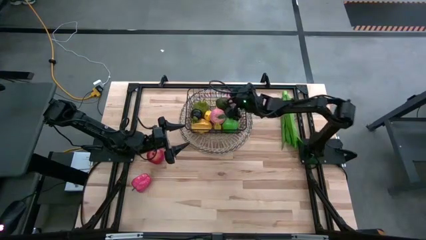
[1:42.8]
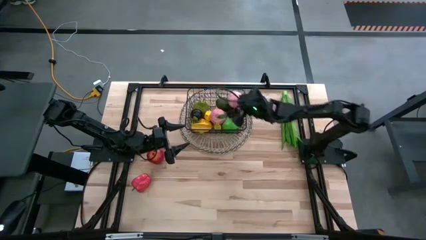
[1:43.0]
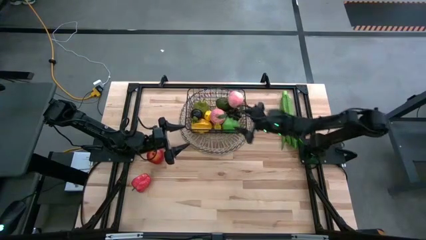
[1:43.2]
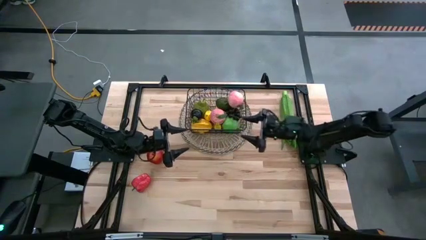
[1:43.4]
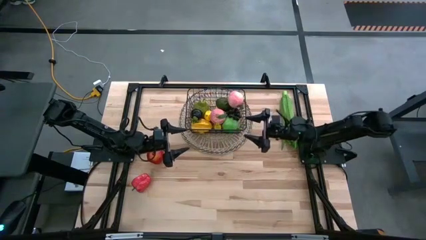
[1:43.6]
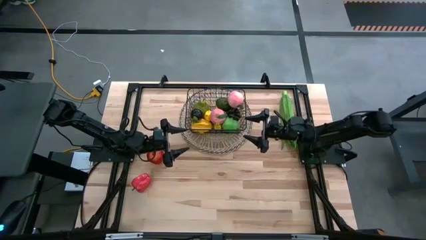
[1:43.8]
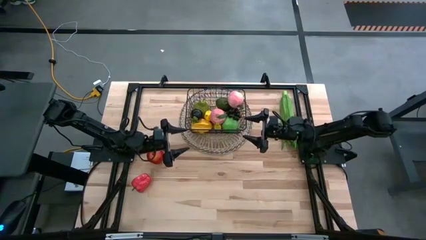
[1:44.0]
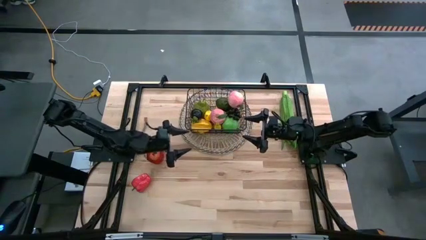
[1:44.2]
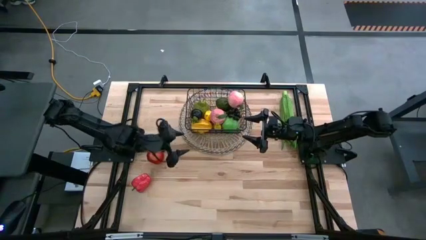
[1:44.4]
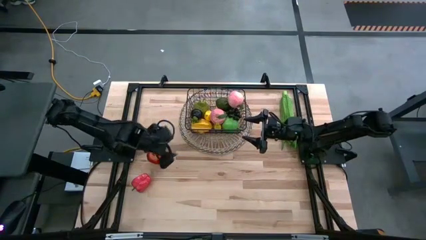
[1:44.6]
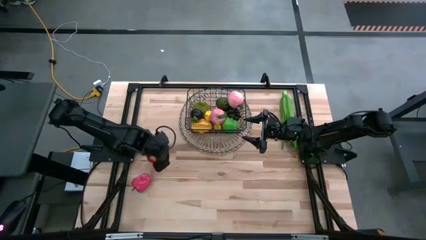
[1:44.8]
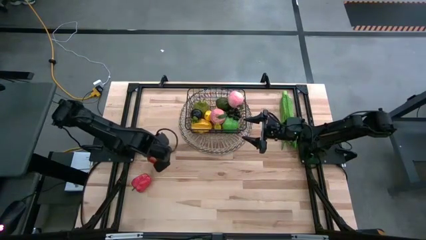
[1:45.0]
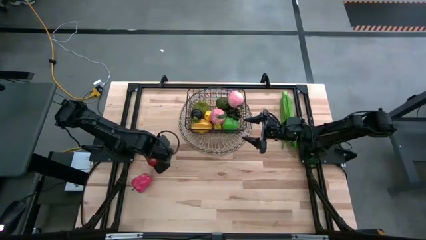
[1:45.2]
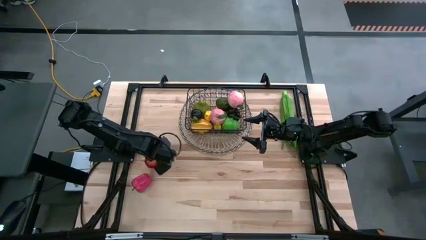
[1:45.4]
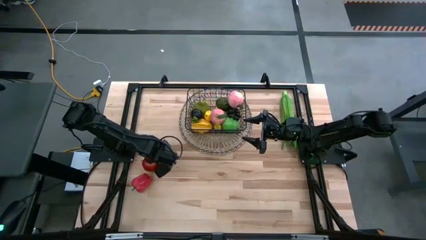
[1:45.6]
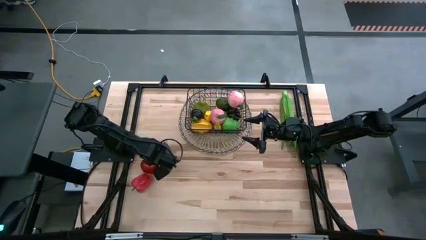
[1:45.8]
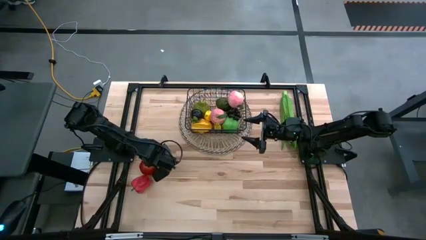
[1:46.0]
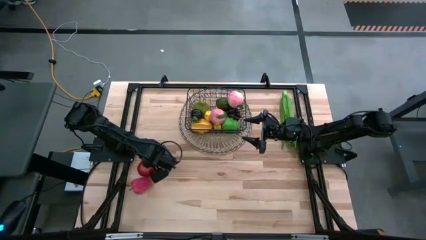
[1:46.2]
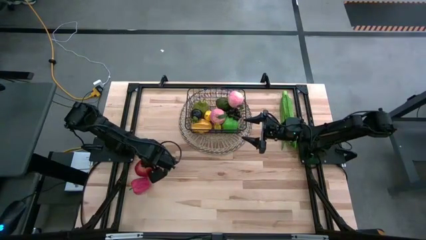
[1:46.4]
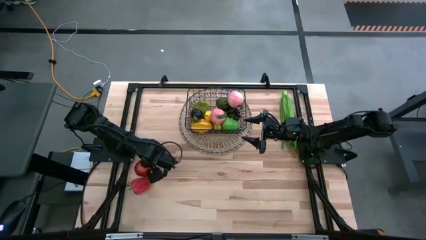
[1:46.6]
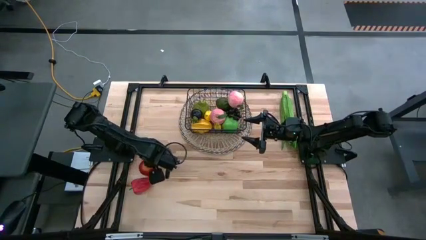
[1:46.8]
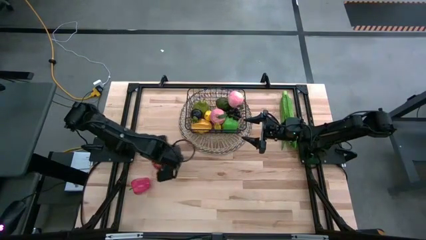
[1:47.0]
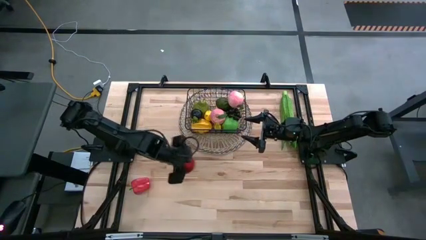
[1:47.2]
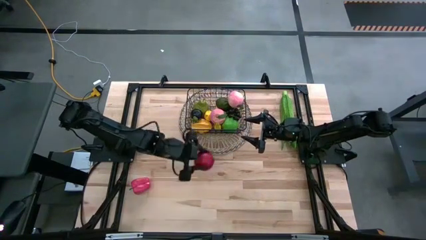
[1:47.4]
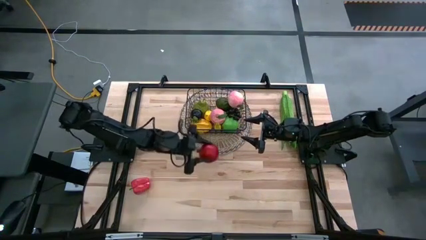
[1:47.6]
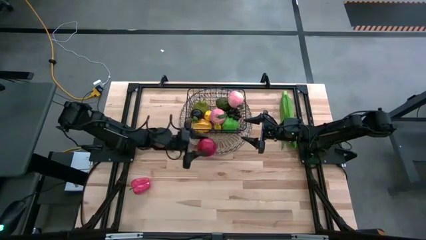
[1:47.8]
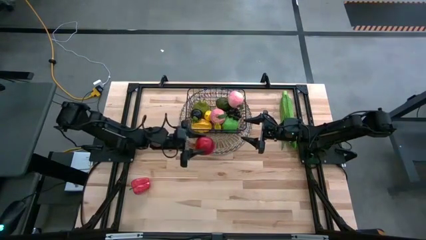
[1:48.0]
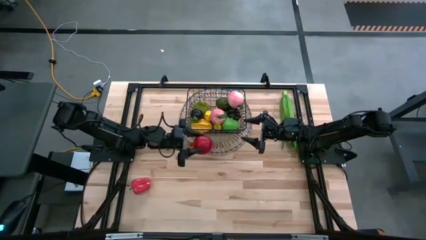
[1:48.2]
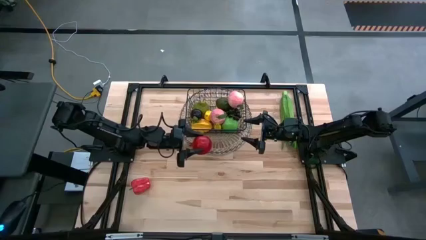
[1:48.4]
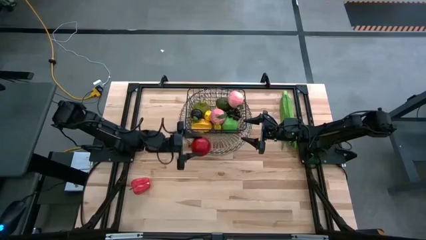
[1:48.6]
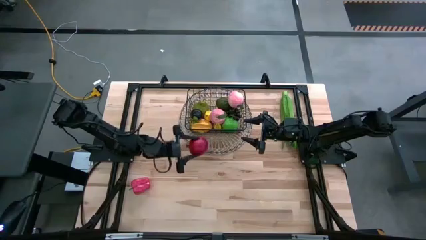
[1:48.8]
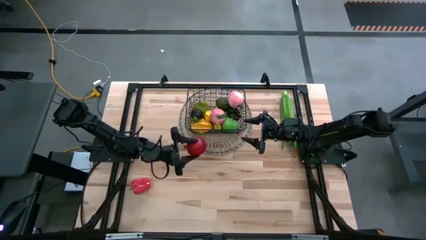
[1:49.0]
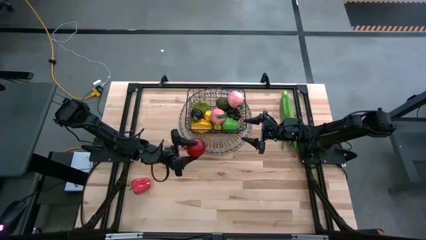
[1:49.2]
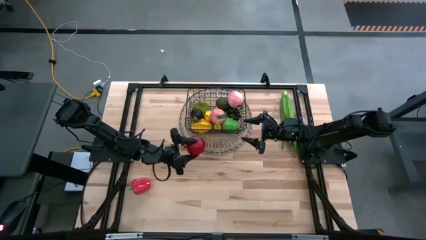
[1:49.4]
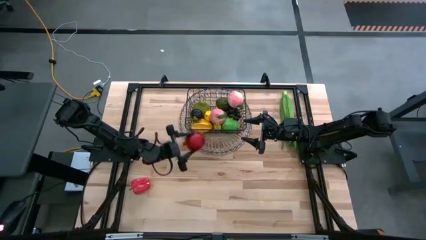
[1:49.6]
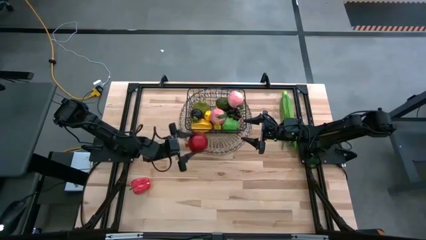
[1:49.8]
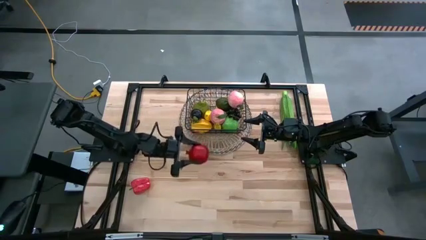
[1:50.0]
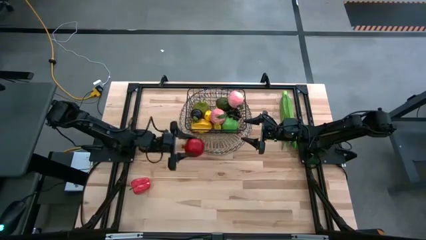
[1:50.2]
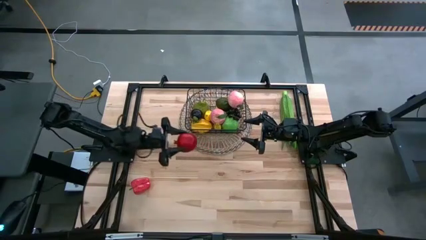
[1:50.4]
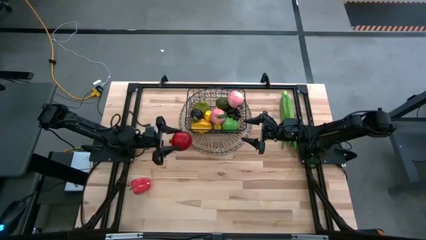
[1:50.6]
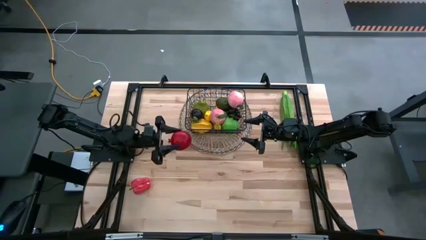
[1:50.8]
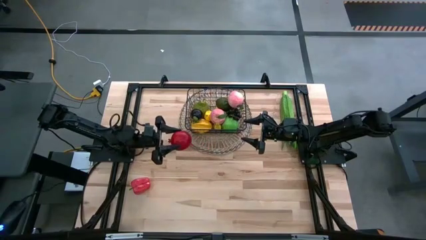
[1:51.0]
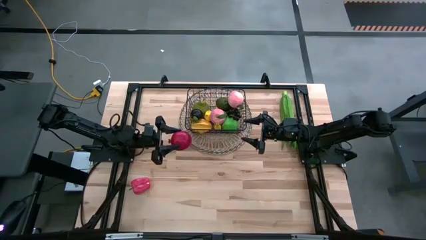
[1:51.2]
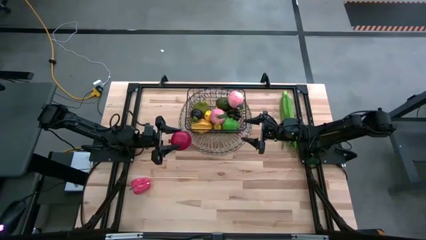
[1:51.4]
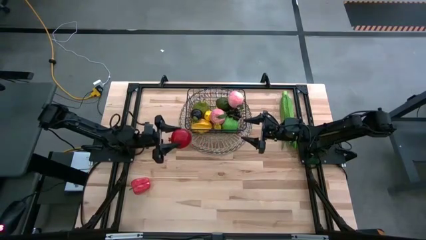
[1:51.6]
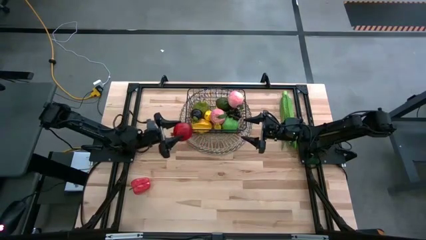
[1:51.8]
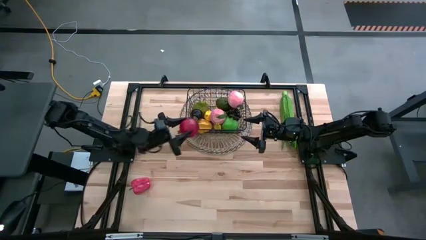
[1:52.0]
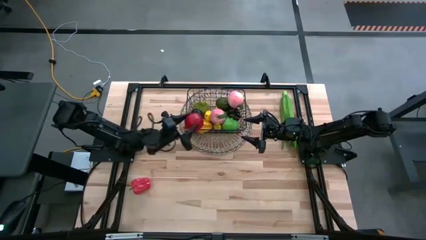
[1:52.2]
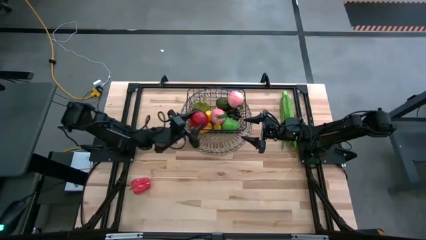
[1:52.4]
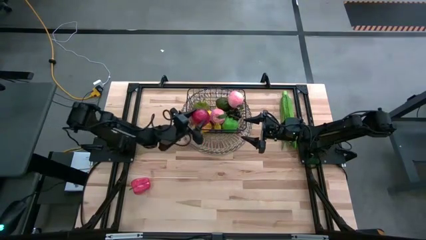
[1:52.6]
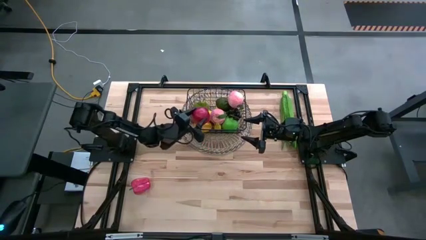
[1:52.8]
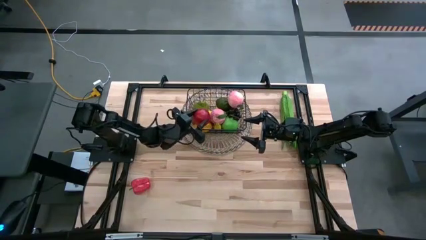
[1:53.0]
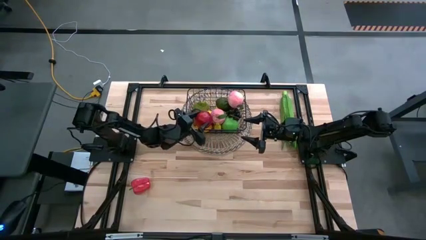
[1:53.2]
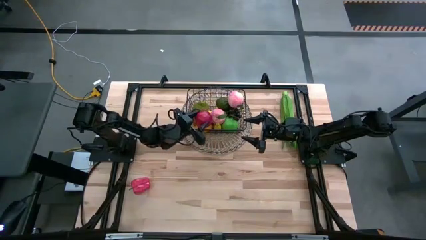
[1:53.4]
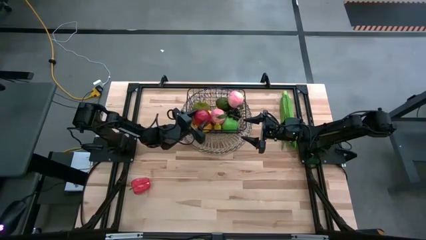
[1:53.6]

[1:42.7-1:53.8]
Task: Build produce basket
Put the pomegranate into the black wire basket

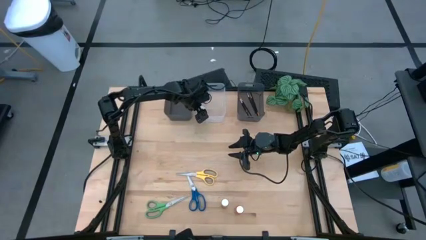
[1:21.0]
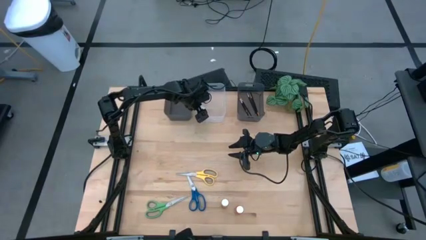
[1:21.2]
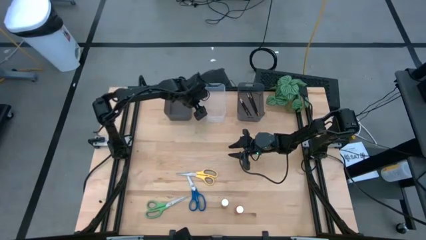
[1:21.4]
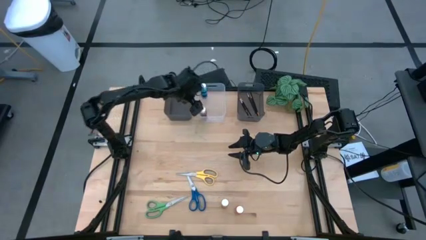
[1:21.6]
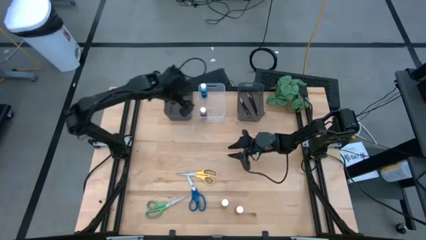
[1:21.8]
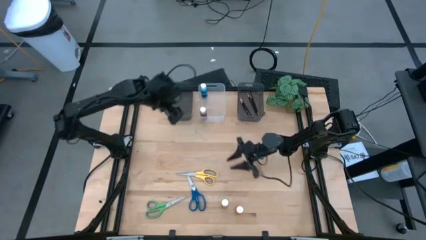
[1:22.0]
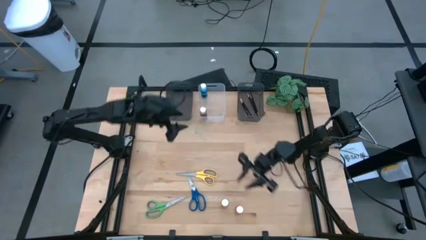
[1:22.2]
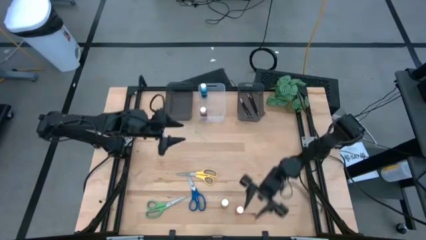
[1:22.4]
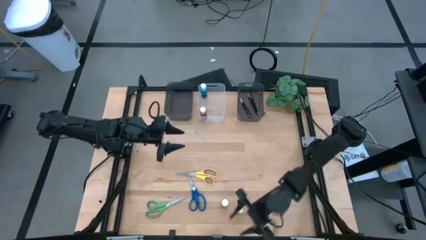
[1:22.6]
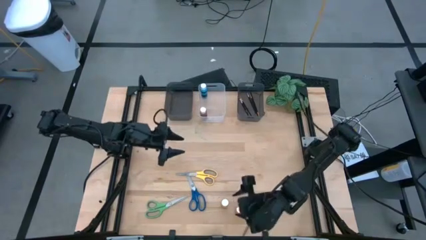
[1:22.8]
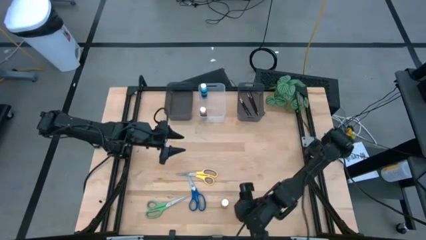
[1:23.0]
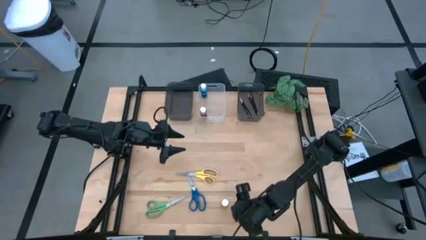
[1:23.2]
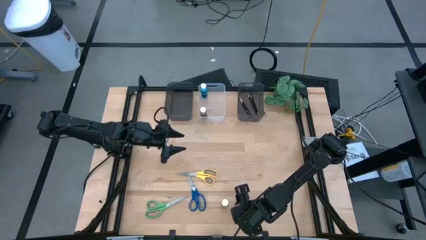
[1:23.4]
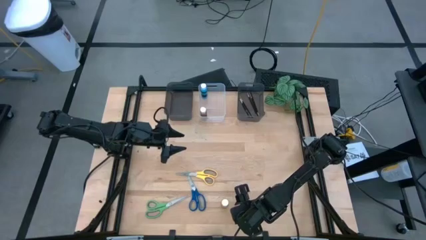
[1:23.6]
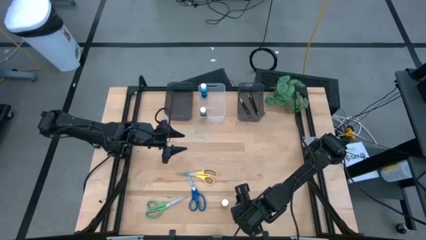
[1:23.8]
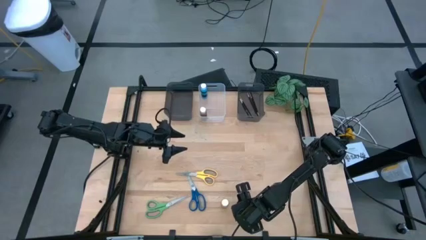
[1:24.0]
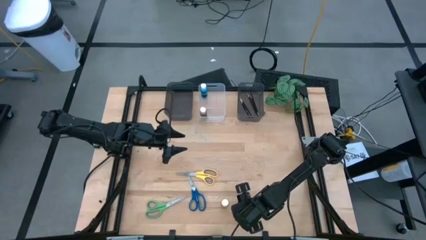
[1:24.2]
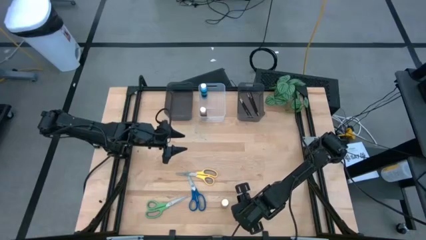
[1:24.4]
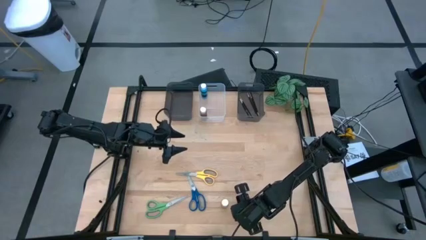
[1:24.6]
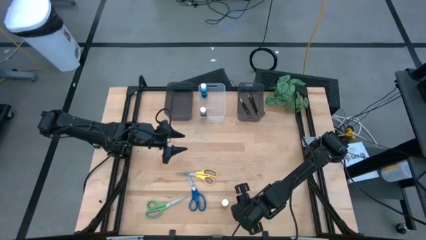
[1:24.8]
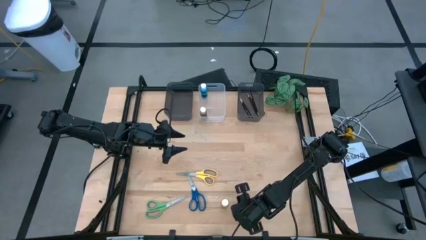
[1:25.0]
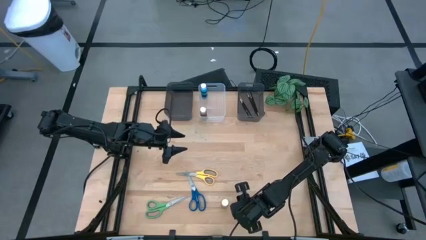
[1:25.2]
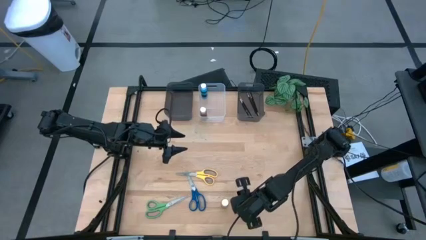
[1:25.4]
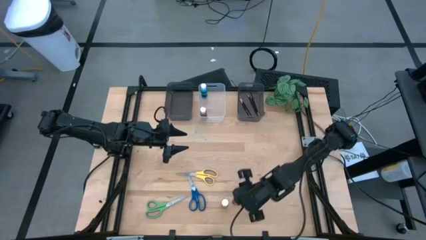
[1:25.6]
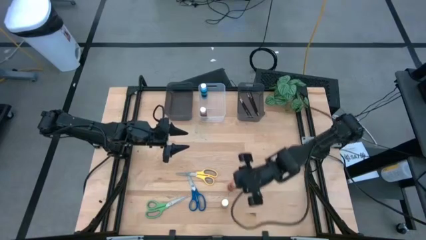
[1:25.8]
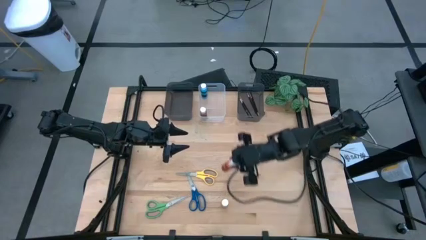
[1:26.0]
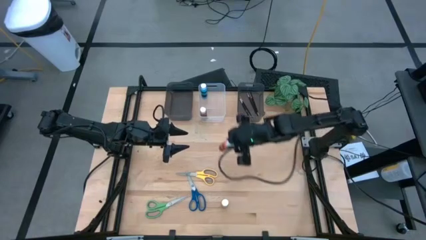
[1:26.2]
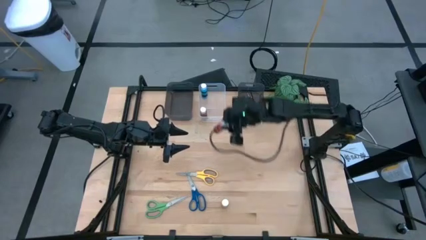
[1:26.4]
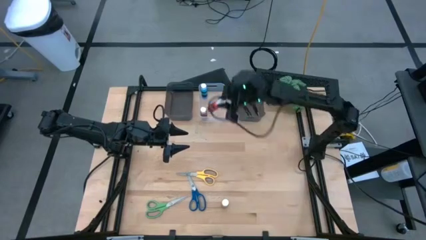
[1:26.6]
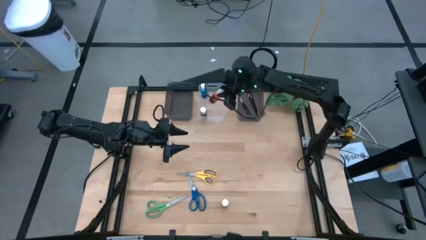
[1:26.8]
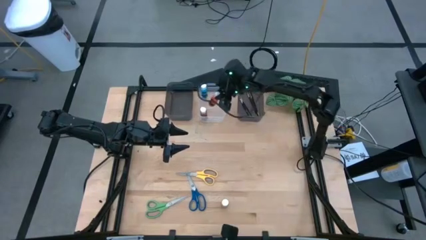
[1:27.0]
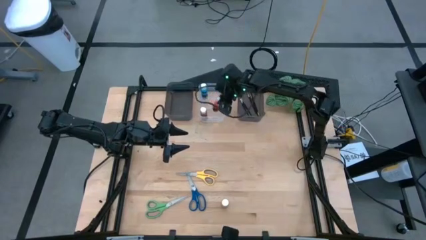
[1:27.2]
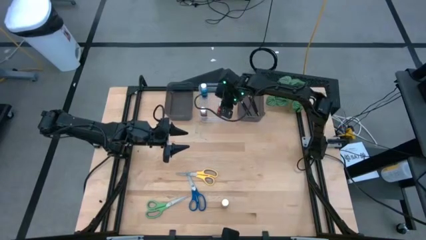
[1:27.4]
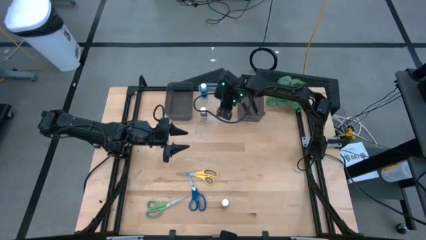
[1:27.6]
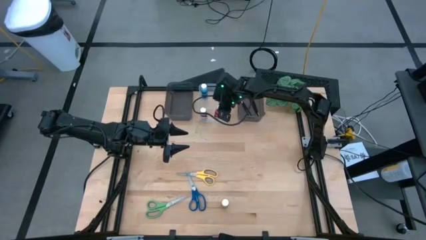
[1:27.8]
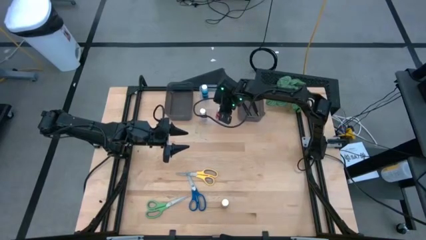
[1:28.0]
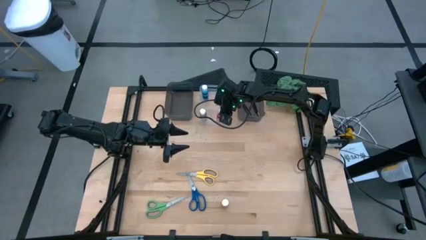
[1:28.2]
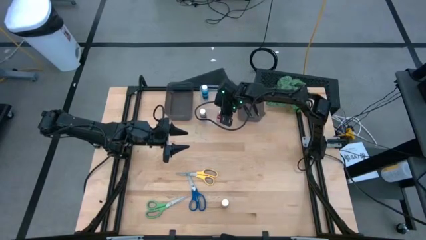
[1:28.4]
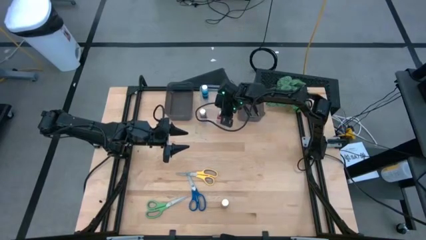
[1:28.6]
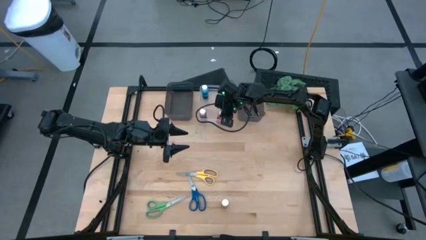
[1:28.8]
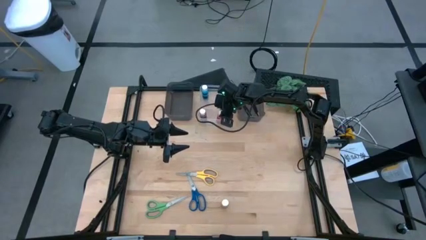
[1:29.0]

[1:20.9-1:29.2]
Task: Pick & Place Paint Supplies
Put the orange paint bottle into the transparent bin
